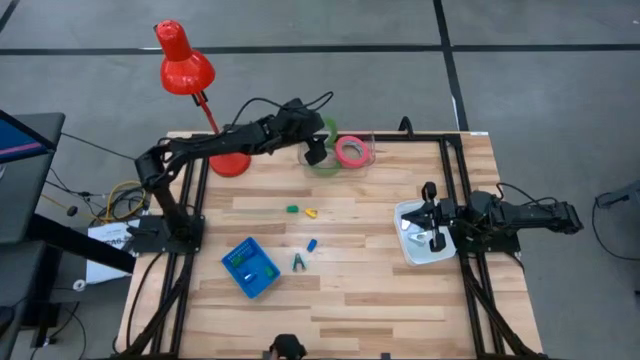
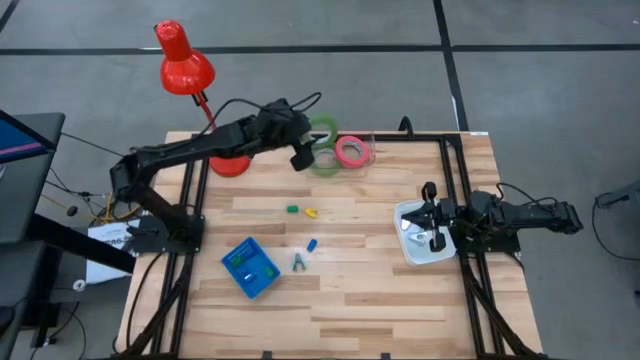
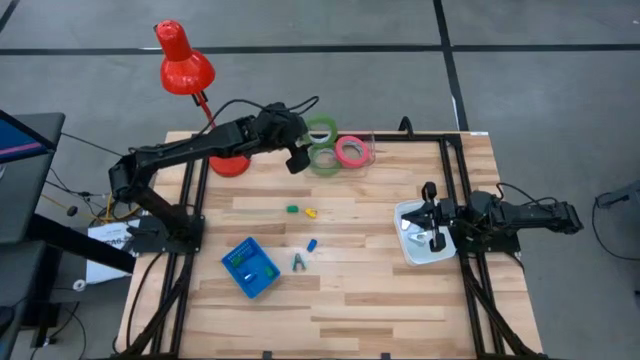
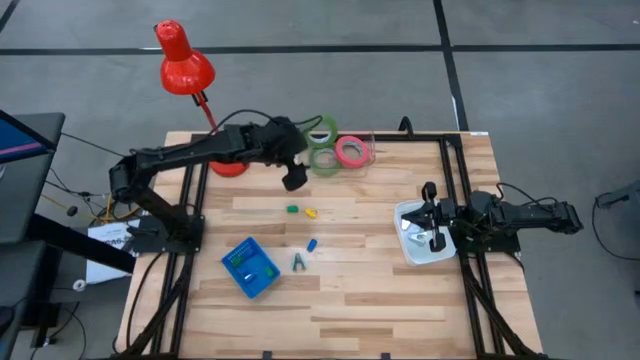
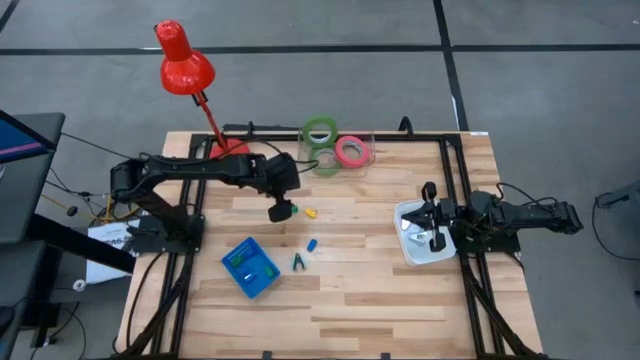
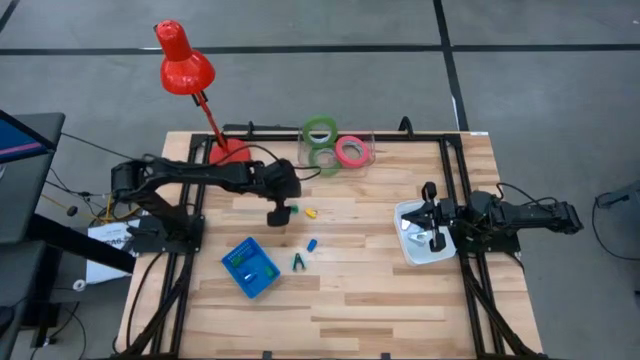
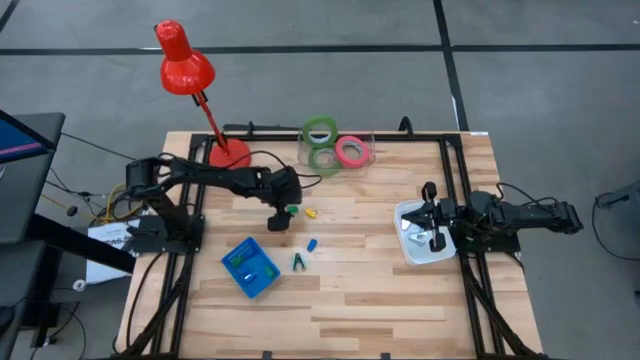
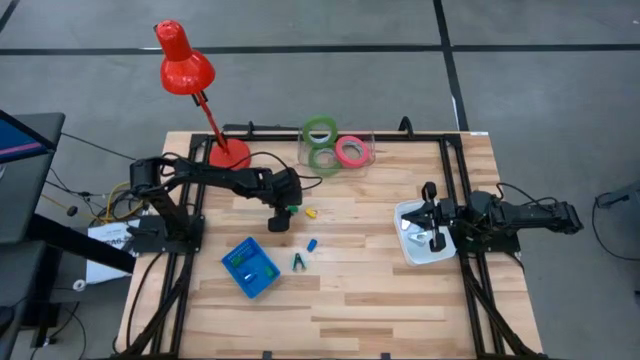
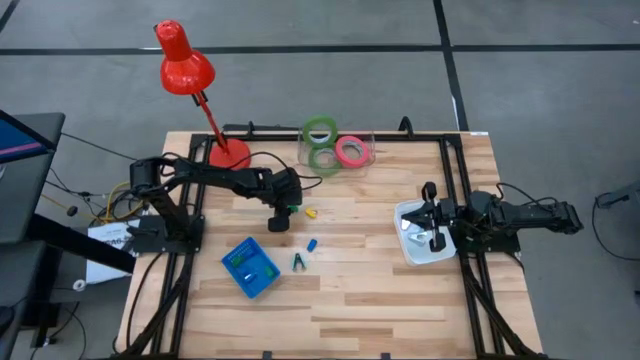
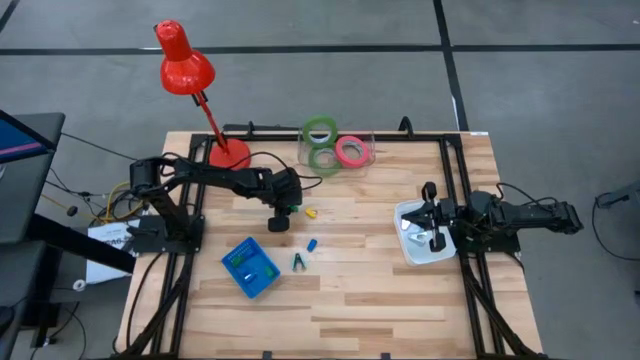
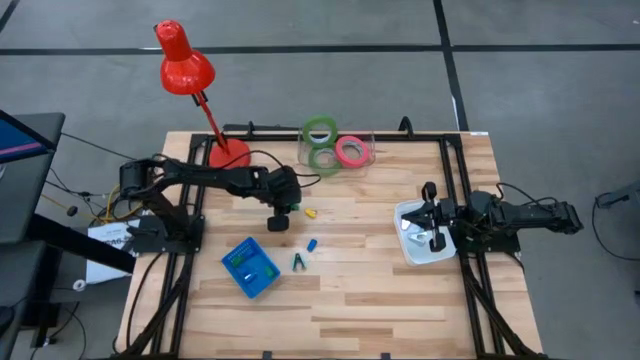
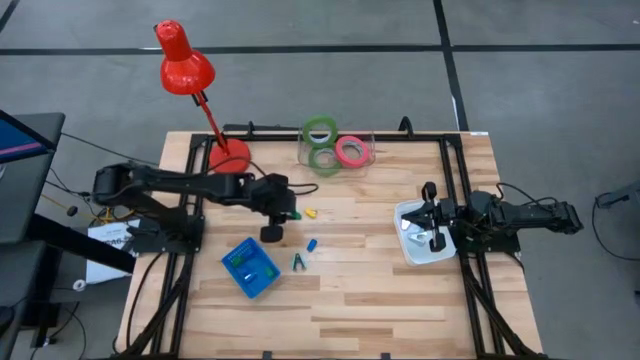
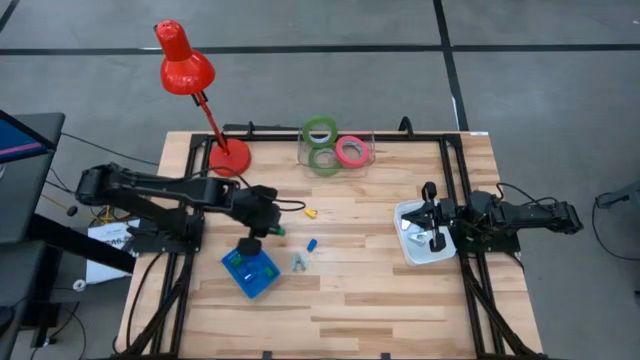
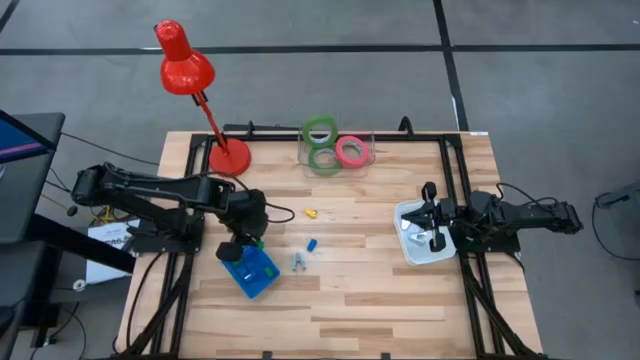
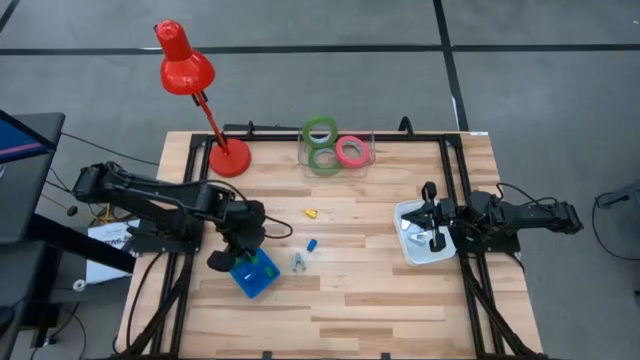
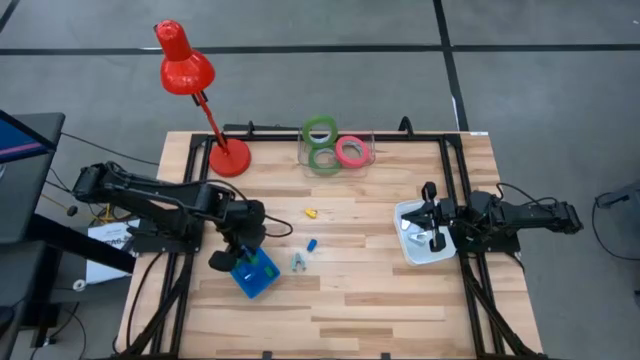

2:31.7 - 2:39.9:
Task: Pick and place Stapler, Stapler remover, tape
Put the green stapler into the blue bin

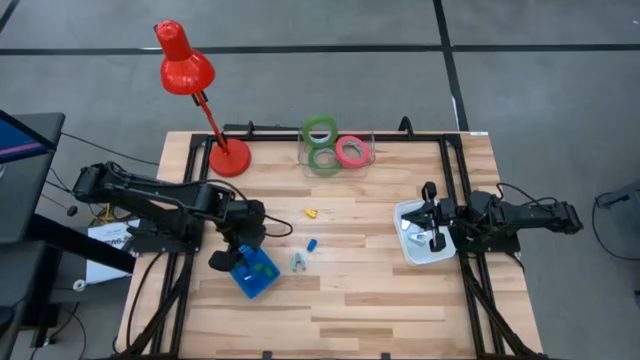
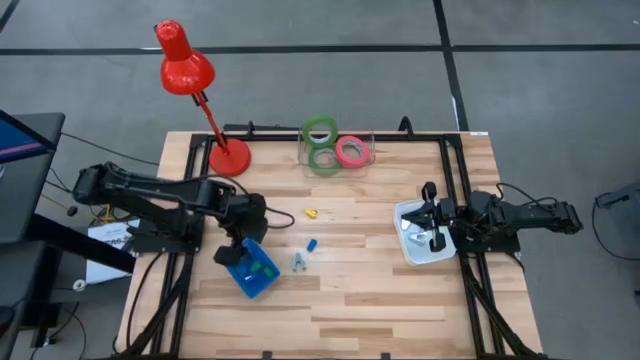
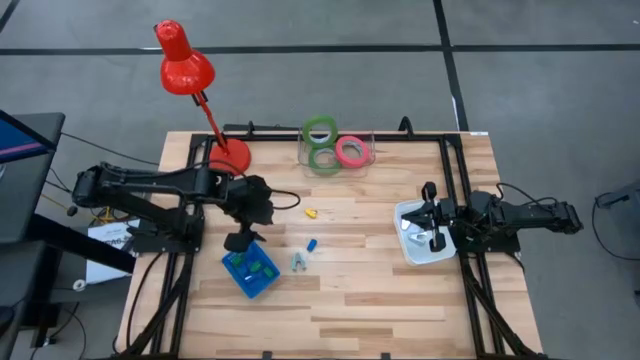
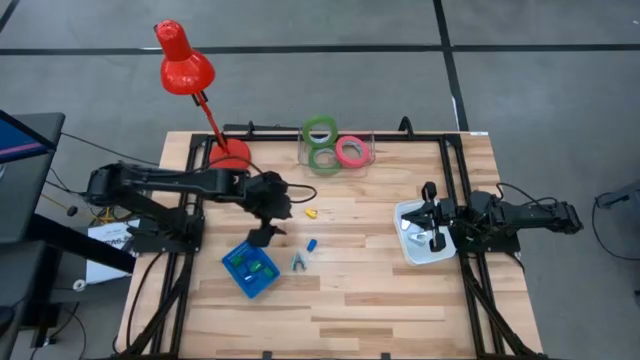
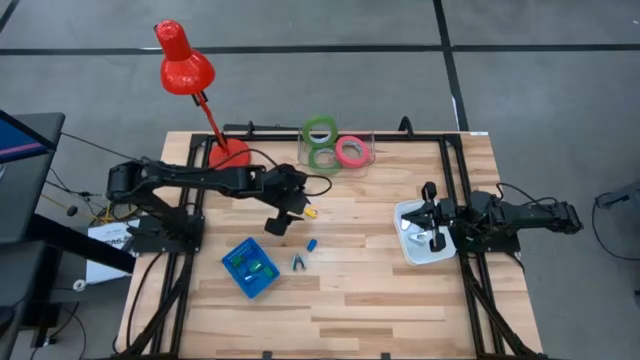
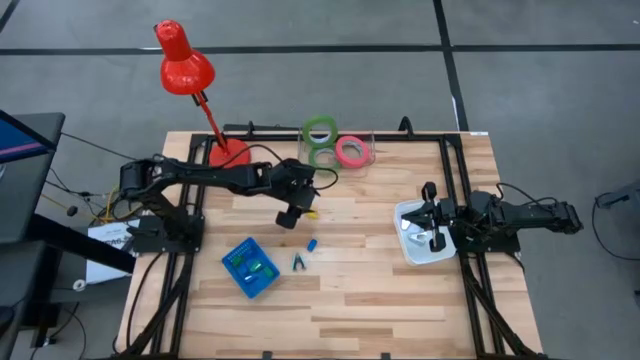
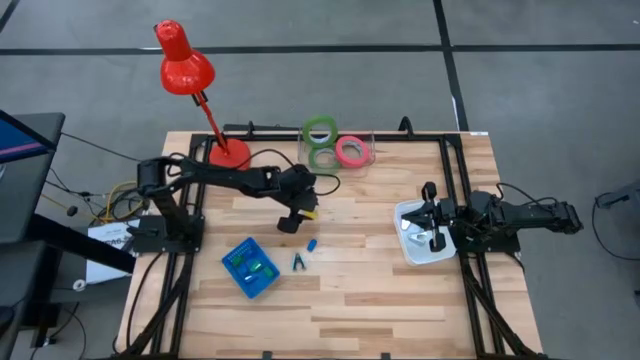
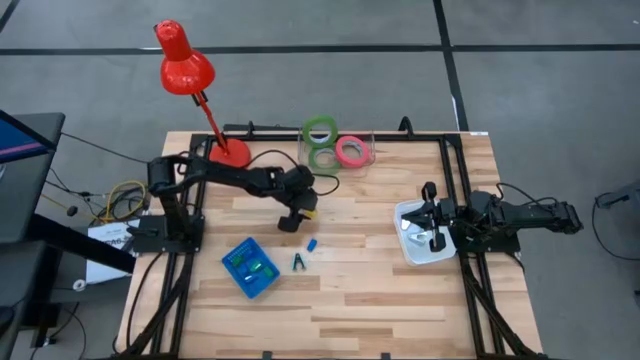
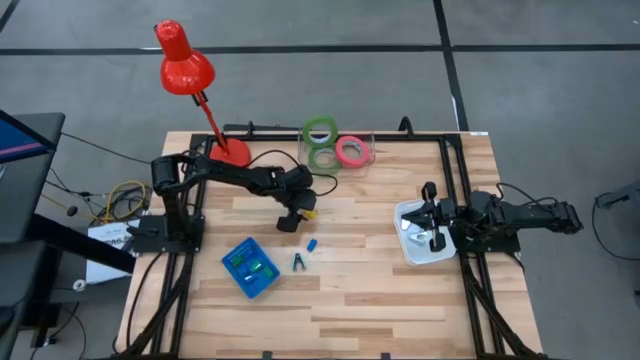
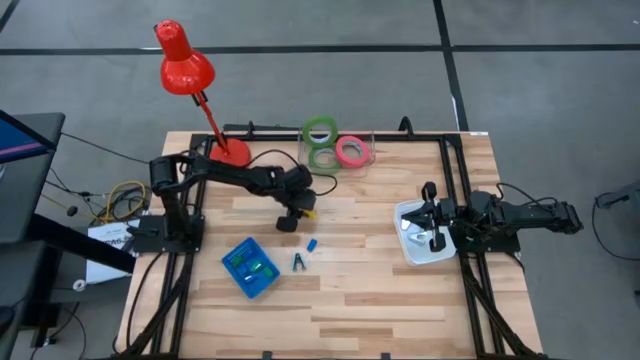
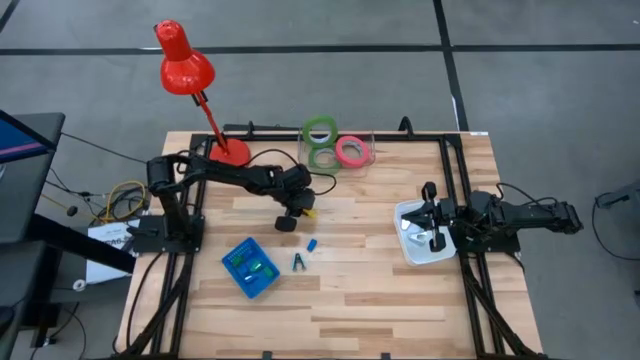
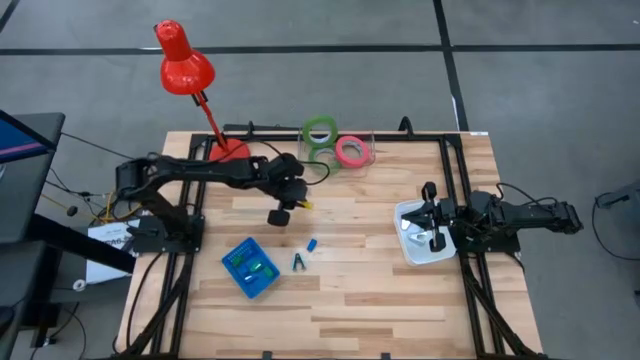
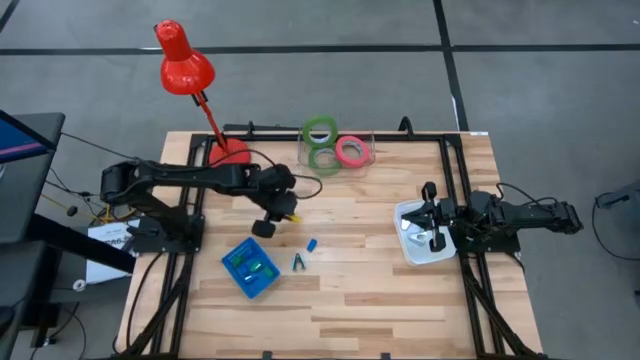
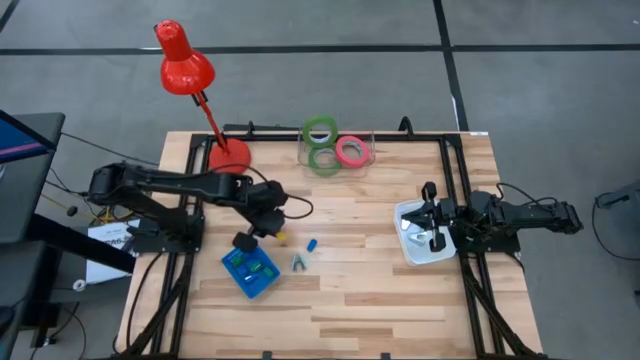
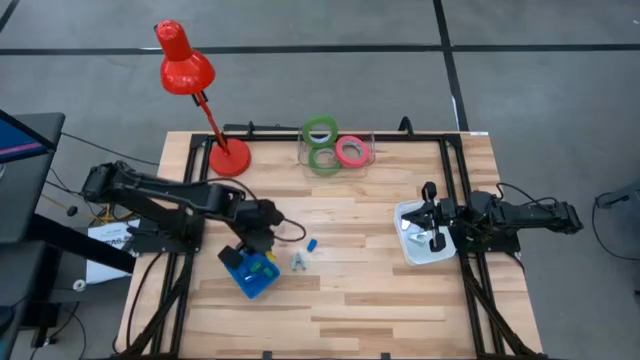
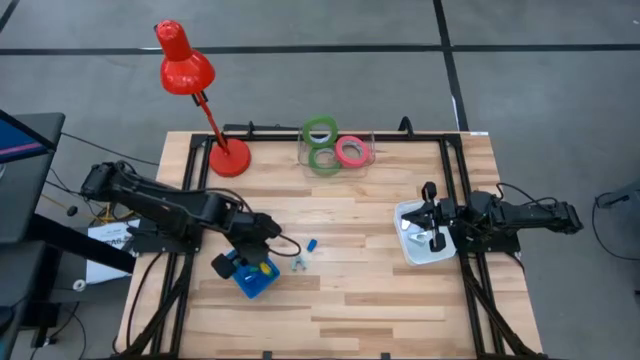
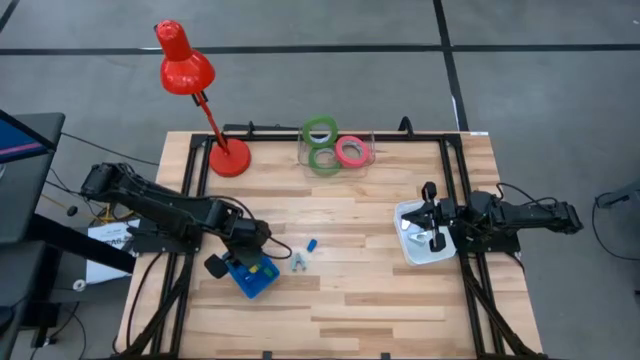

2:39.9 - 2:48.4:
Put the yellow stapler into the blue bin

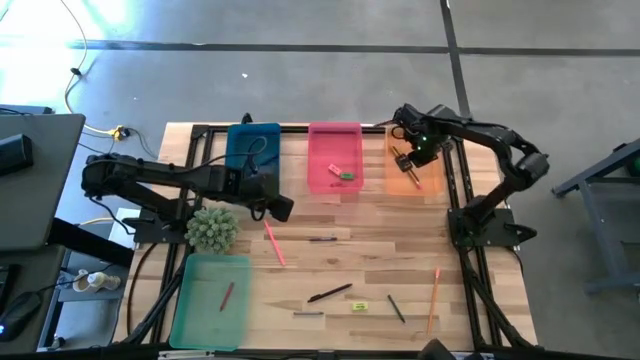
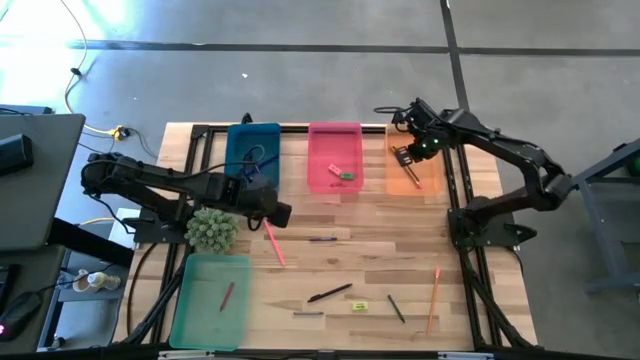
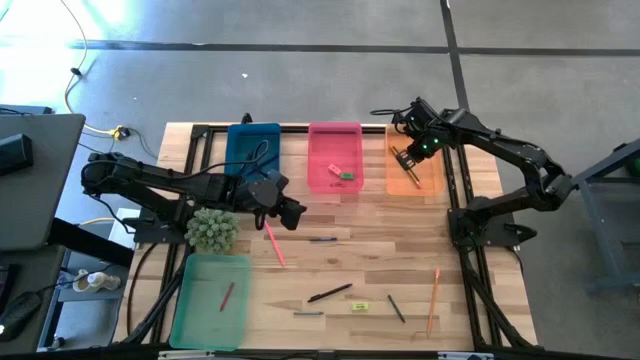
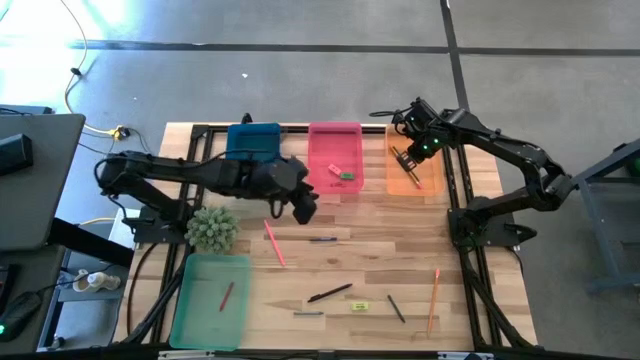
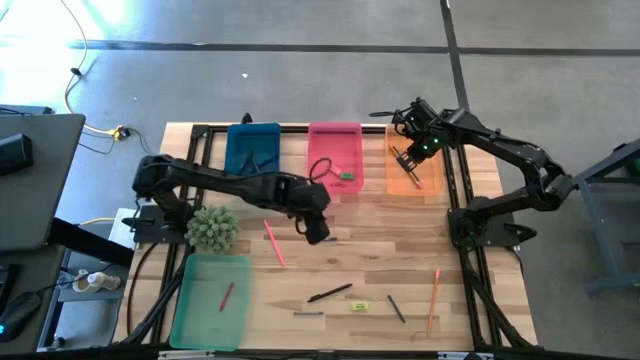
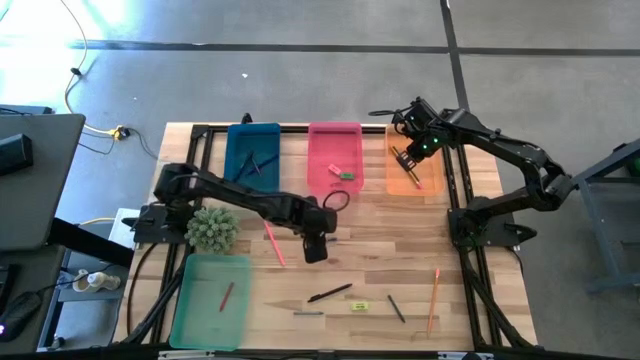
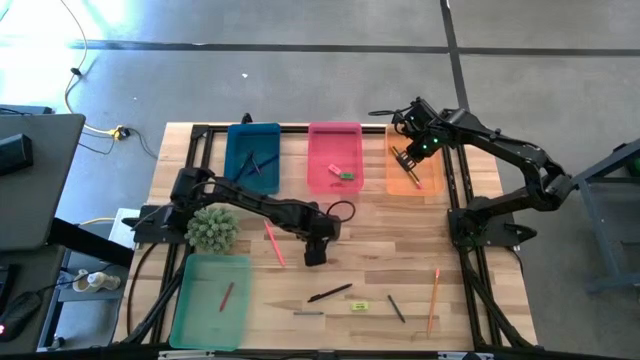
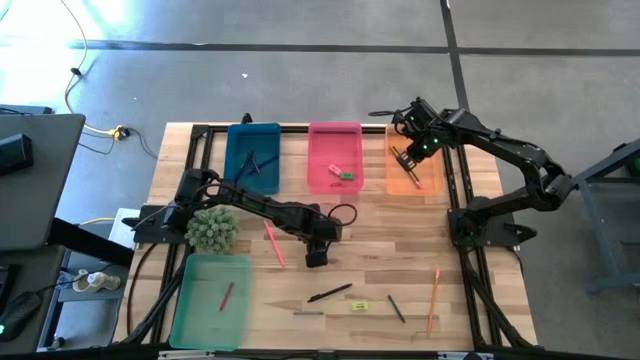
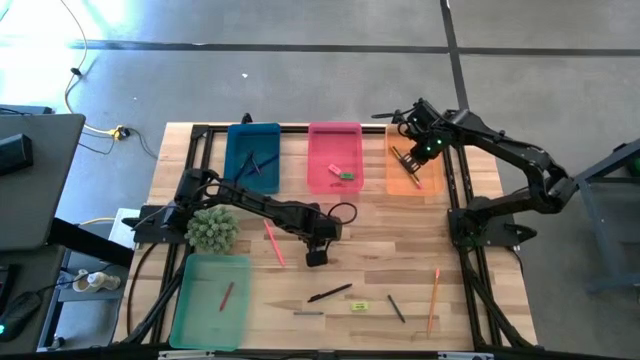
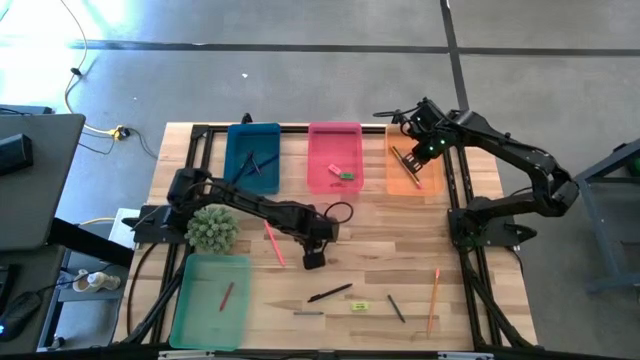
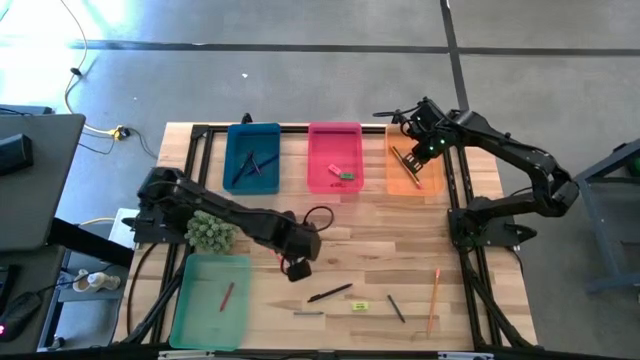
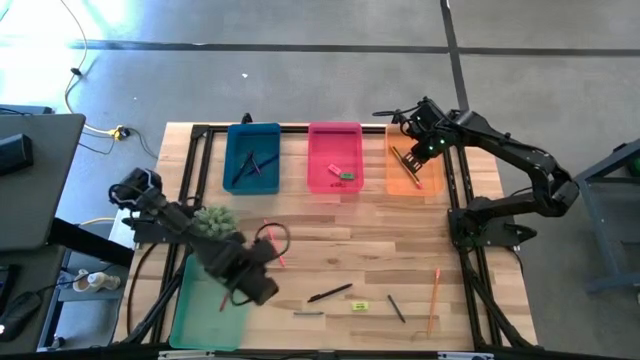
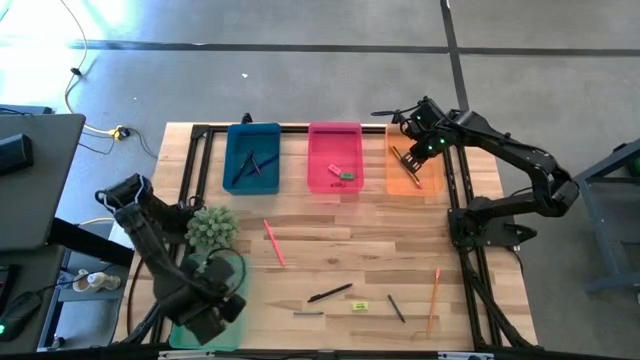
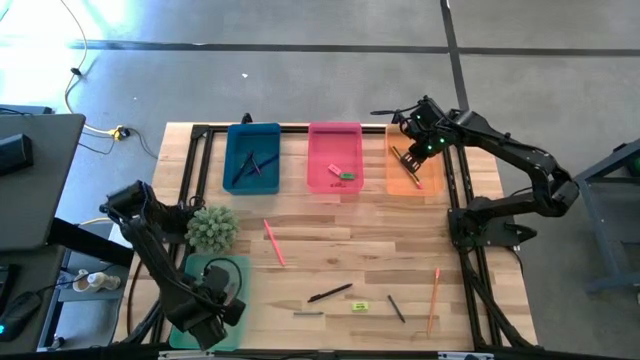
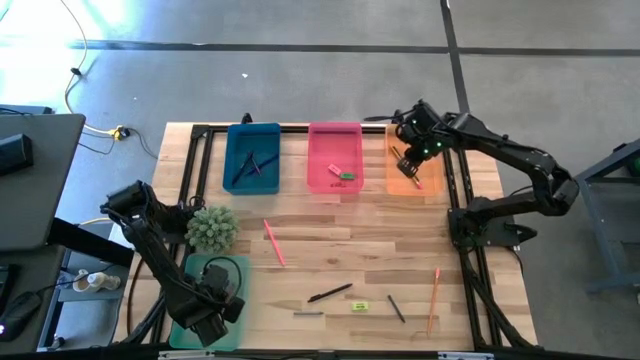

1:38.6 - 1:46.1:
Task: Sort crayons/erasers/pens/pencils in bins
Put the blue crayon into the green bin
